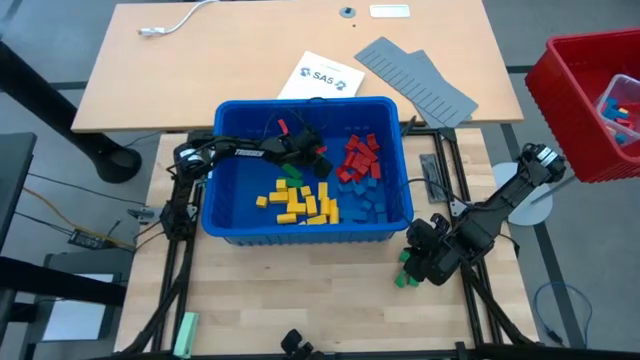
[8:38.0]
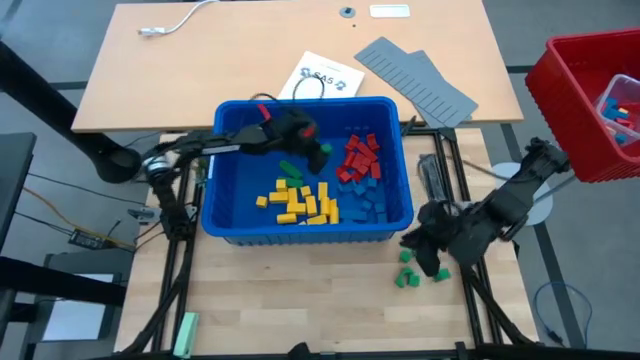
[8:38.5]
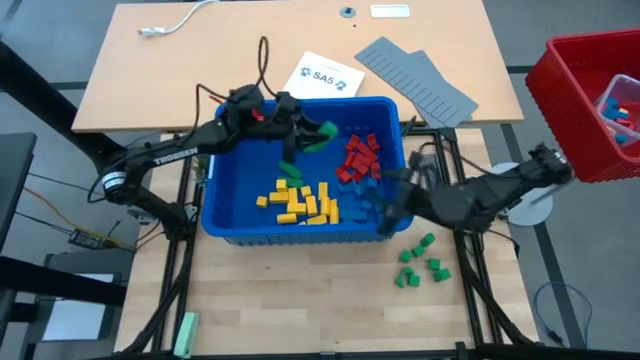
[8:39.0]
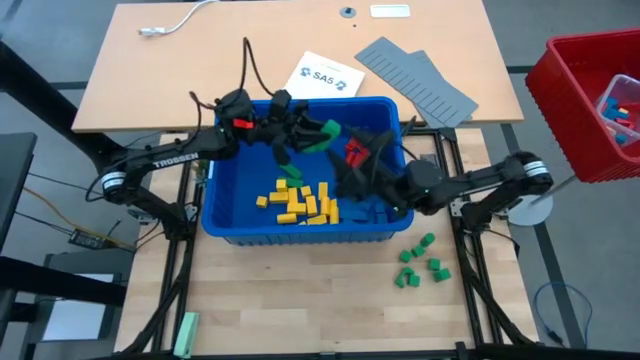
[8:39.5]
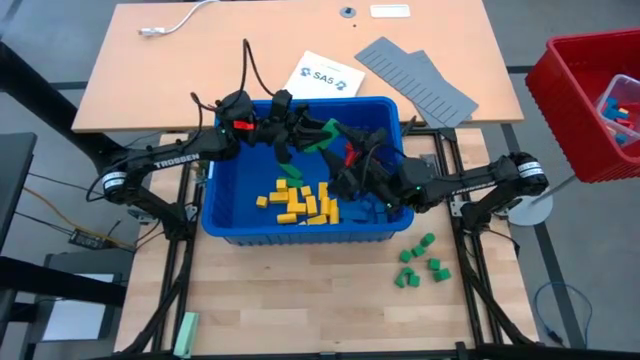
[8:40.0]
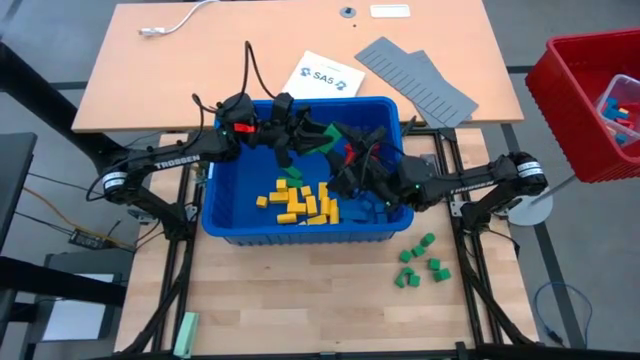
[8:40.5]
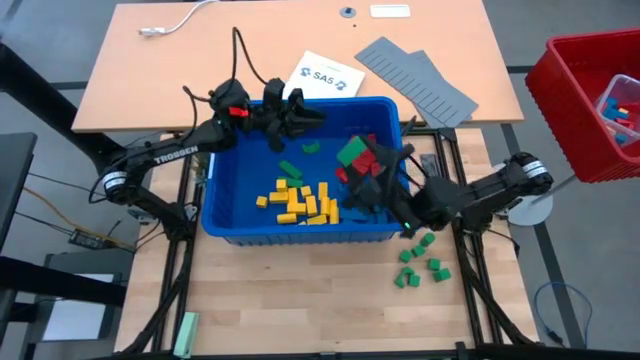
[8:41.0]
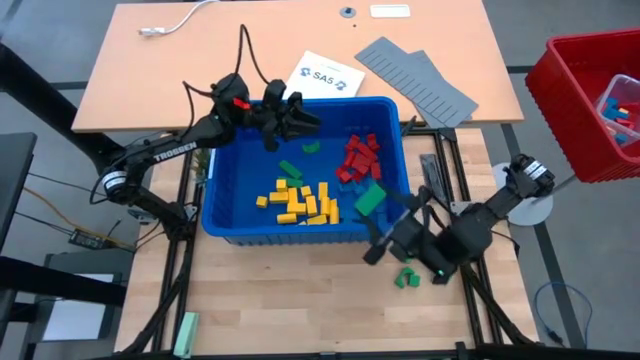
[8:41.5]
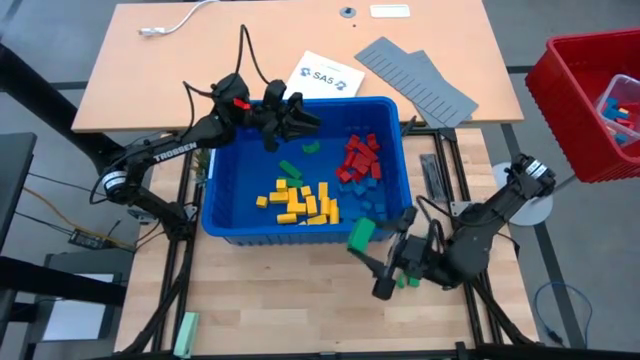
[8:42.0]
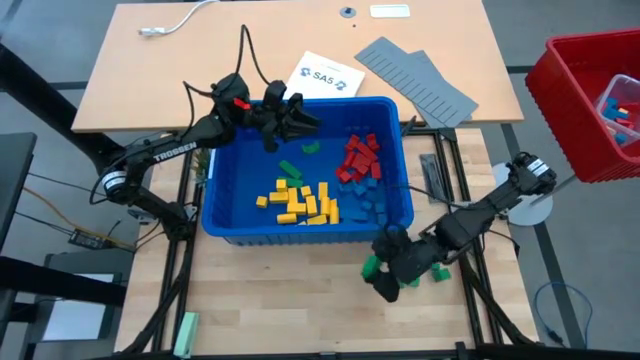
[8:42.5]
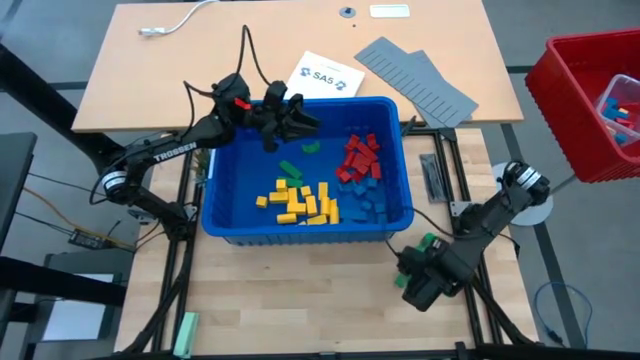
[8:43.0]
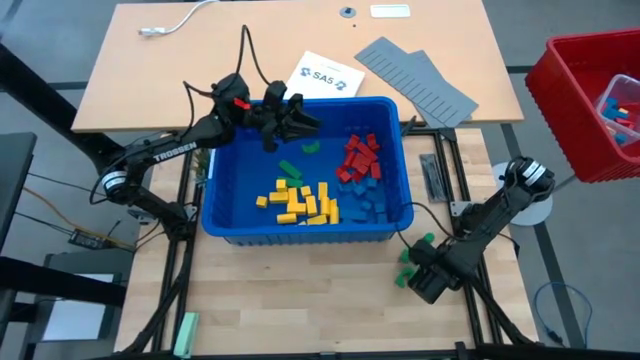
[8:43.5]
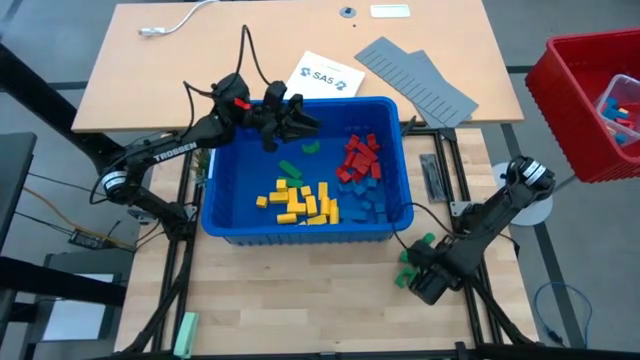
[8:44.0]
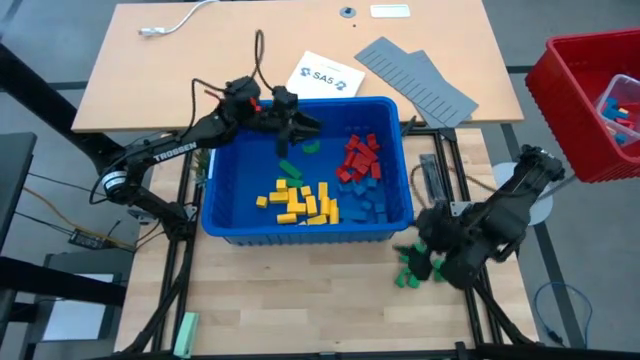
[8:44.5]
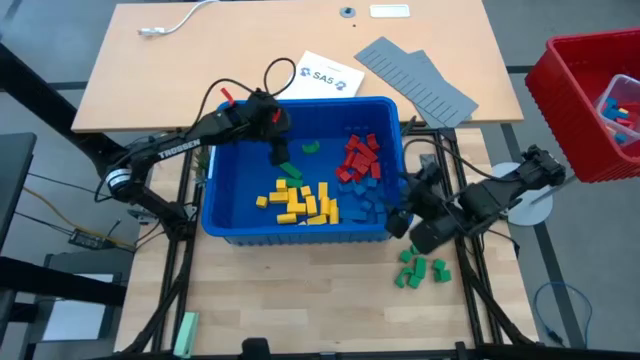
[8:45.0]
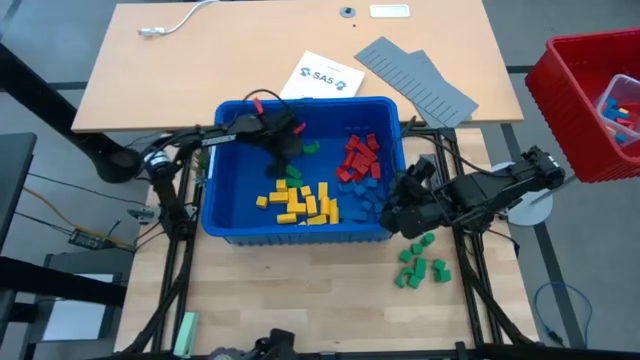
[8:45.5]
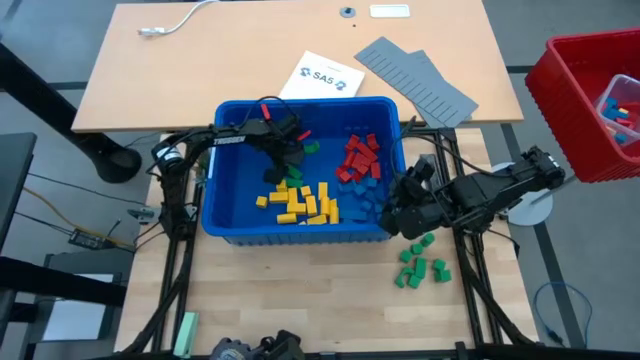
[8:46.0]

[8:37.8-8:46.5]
Task: Sort blocks
Remove the green block from the blue bin

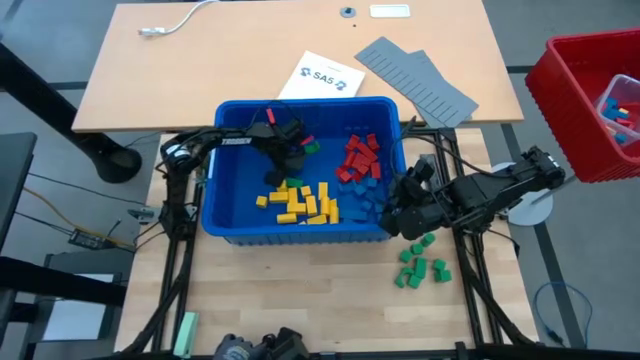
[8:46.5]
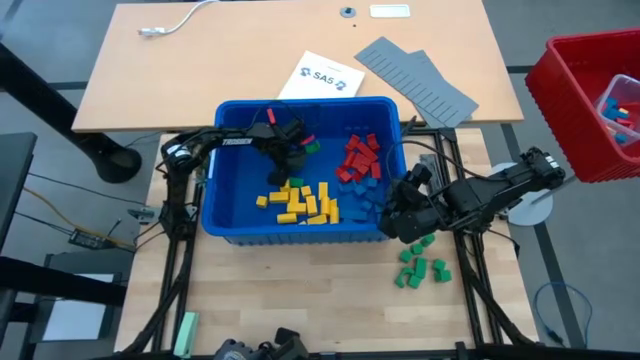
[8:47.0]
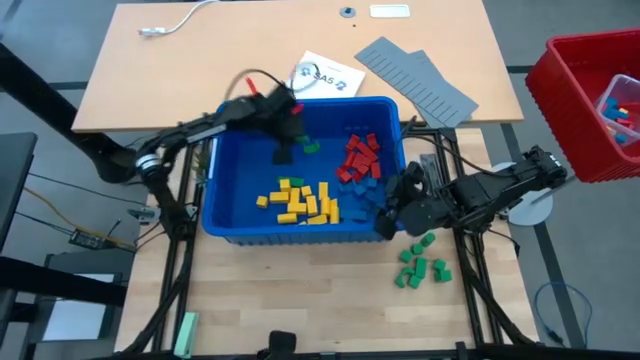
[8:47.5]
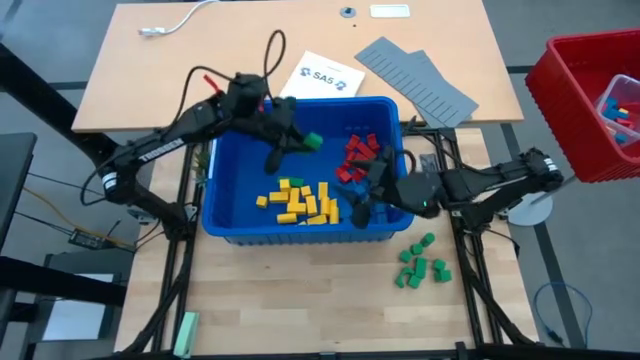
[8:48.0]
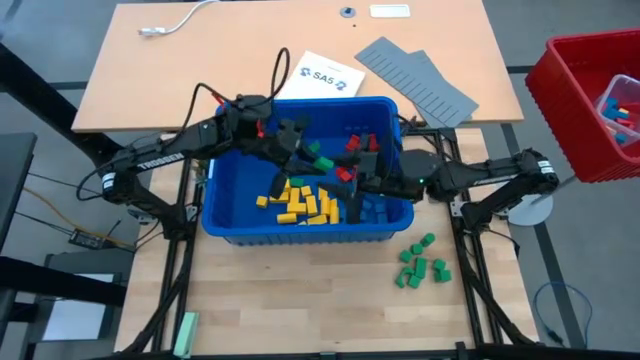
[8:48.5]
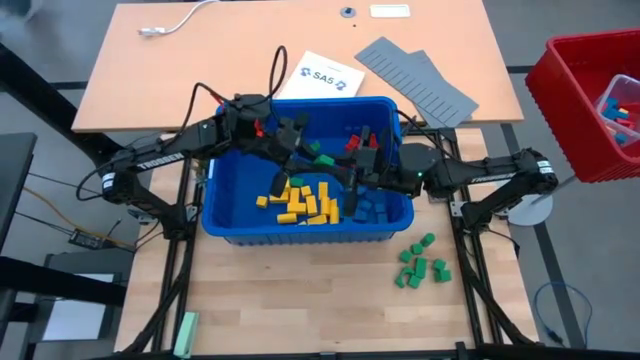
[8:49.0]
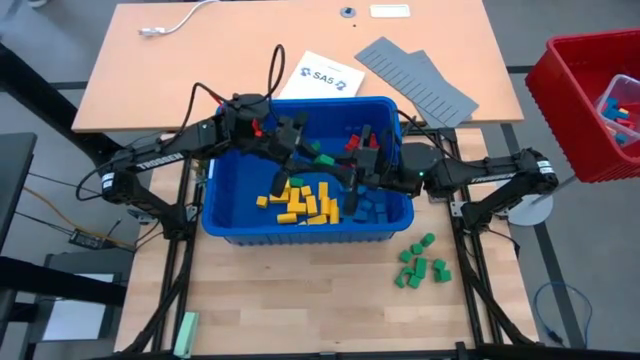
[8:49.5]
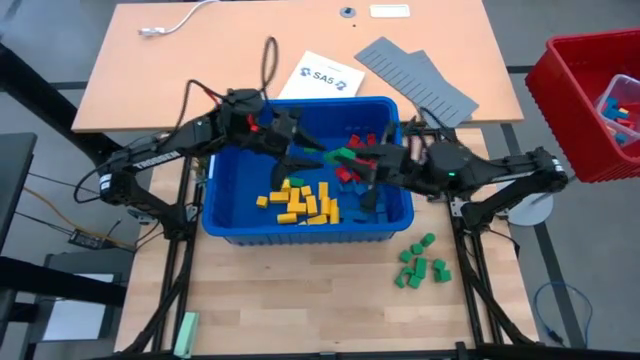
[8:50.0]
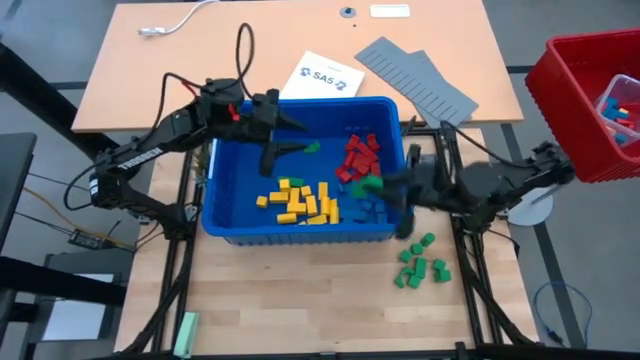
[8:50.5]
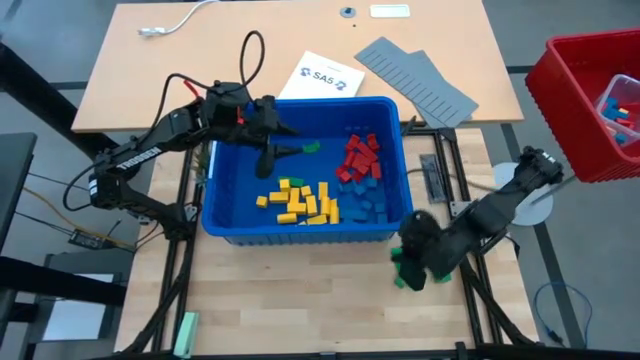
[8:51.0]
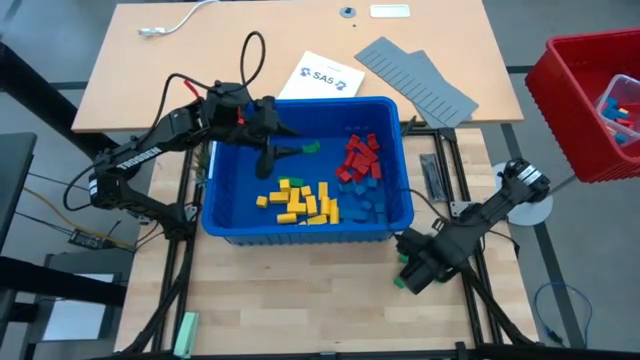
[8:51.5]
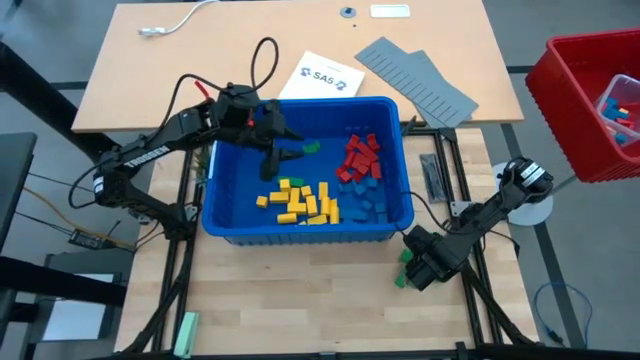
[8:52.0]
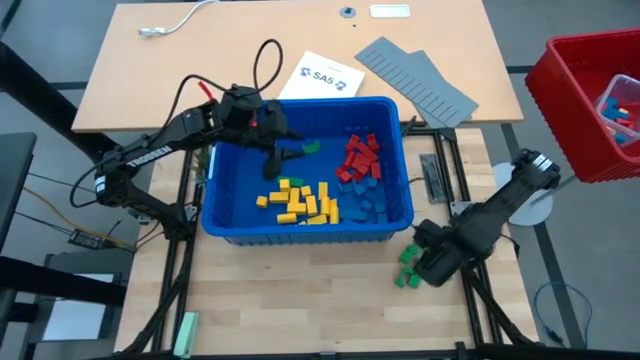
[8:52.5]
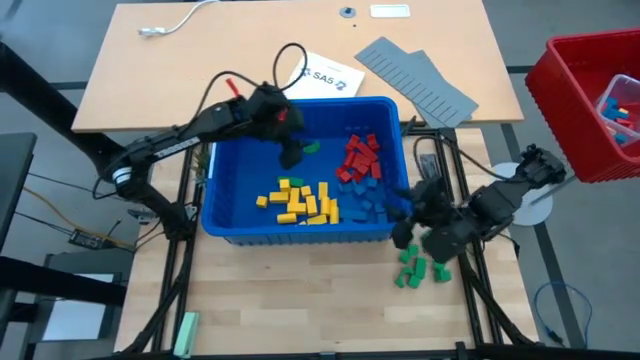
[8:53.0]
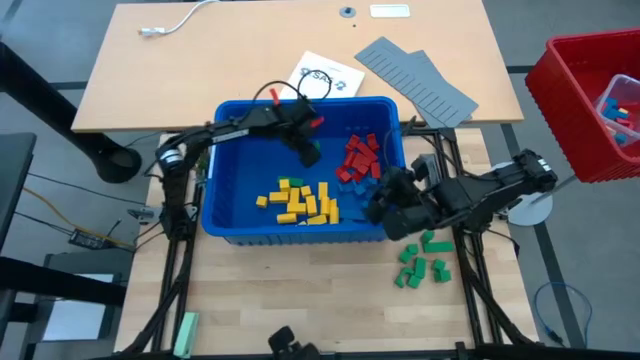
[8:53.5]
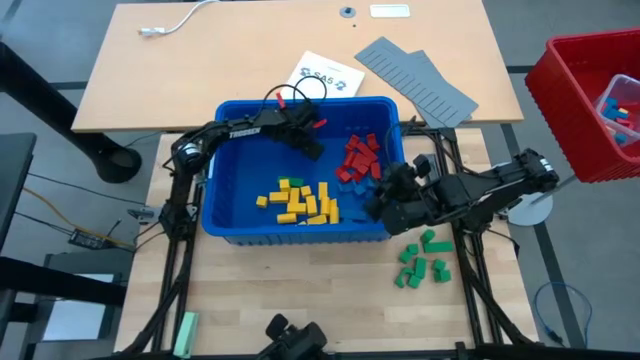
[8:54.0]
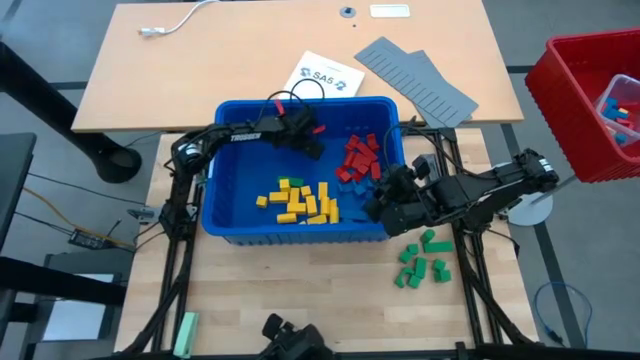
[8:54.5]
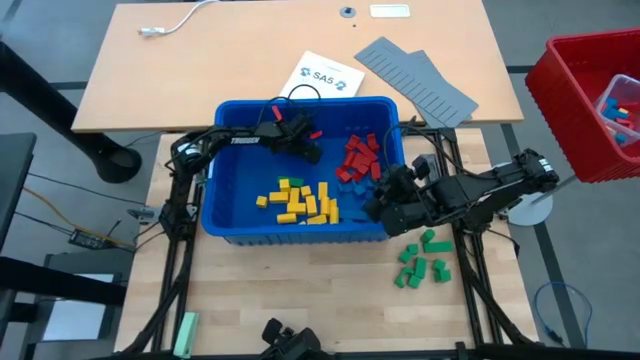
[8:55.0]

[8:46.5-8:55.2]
Remove the green block from the blue bin
